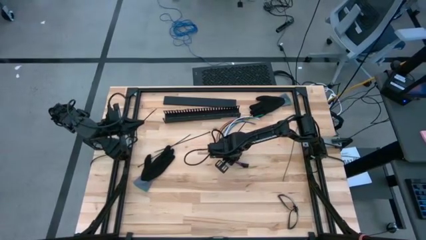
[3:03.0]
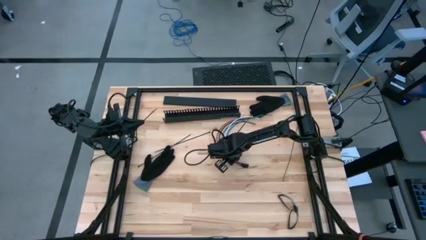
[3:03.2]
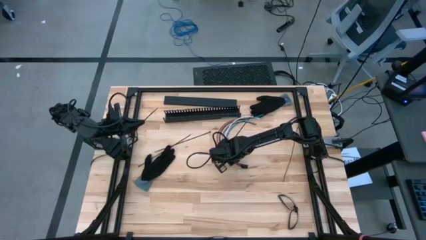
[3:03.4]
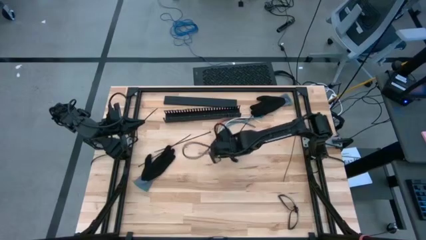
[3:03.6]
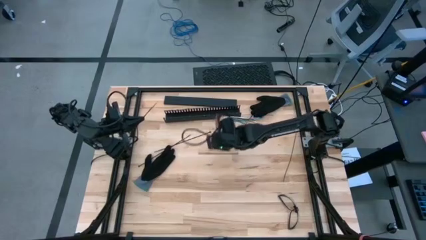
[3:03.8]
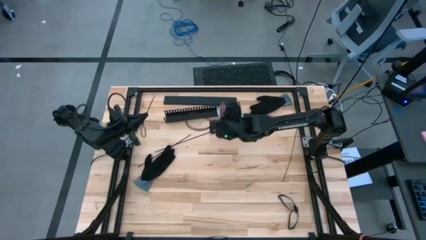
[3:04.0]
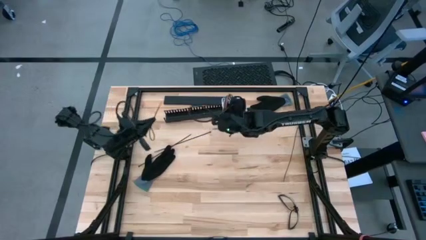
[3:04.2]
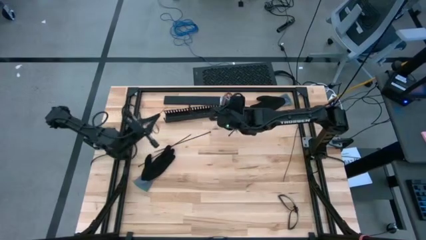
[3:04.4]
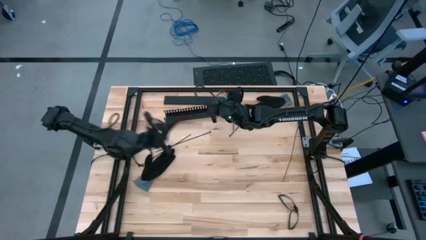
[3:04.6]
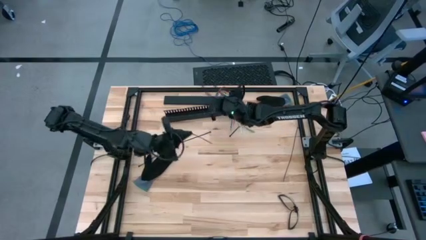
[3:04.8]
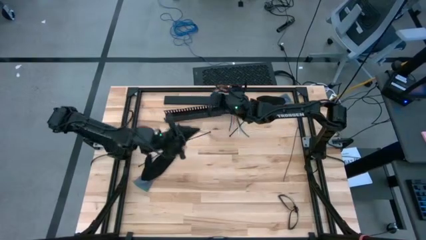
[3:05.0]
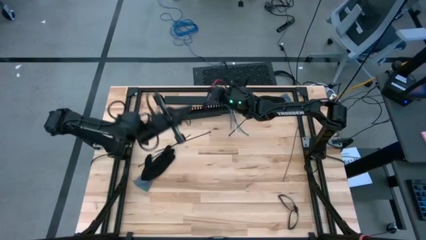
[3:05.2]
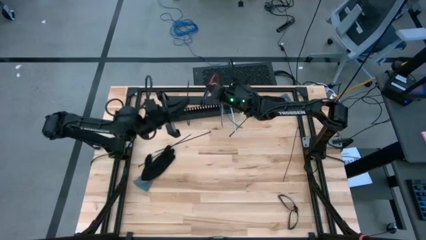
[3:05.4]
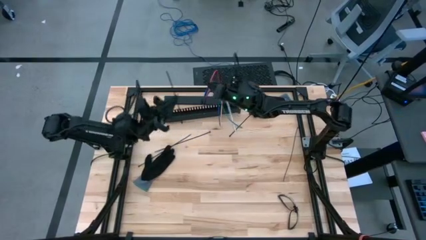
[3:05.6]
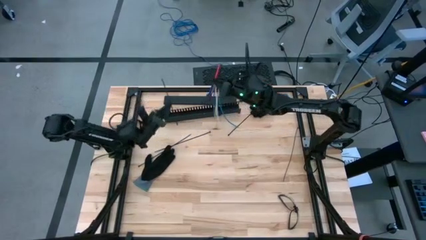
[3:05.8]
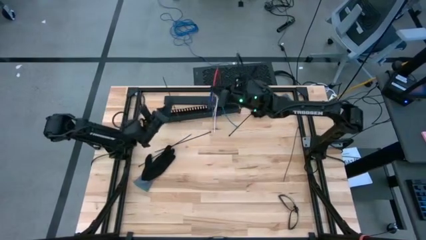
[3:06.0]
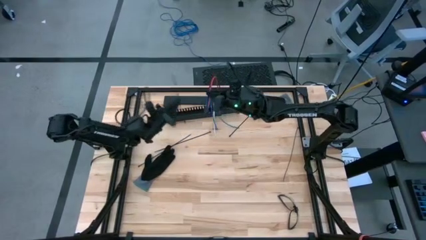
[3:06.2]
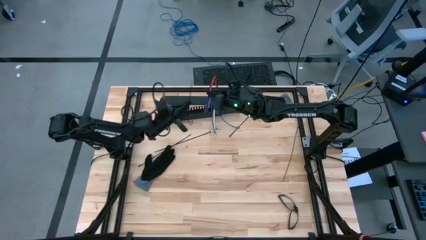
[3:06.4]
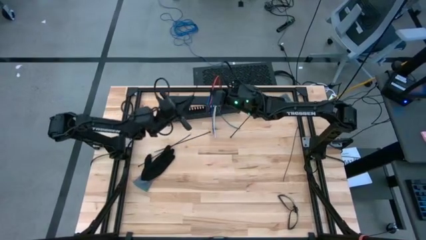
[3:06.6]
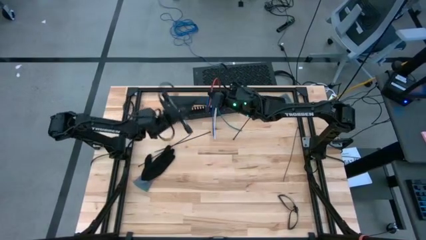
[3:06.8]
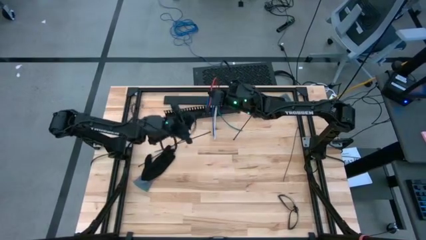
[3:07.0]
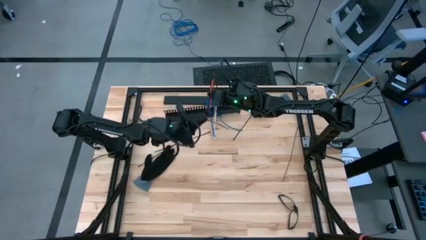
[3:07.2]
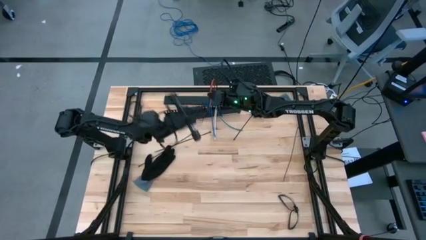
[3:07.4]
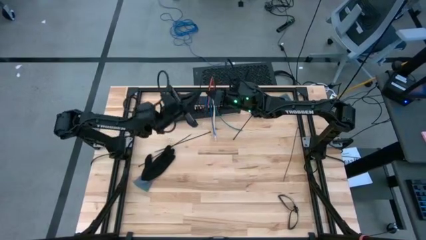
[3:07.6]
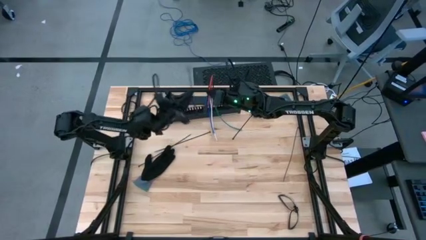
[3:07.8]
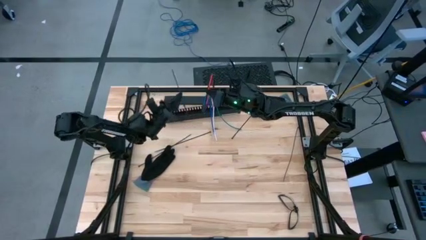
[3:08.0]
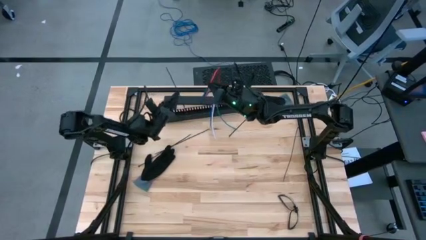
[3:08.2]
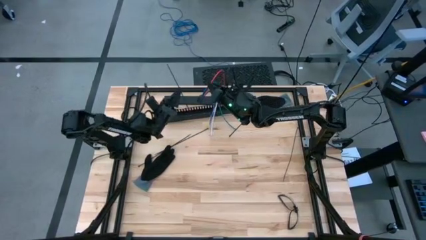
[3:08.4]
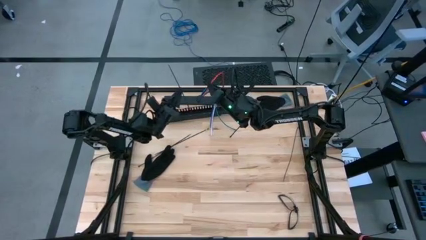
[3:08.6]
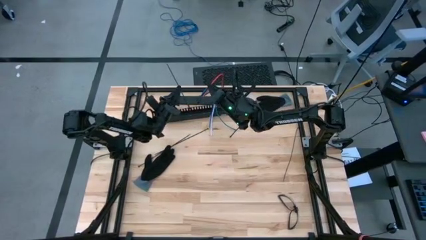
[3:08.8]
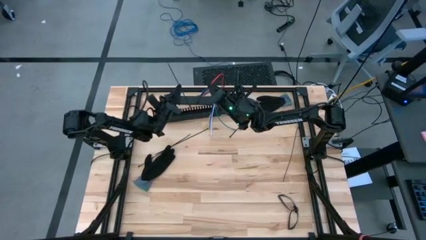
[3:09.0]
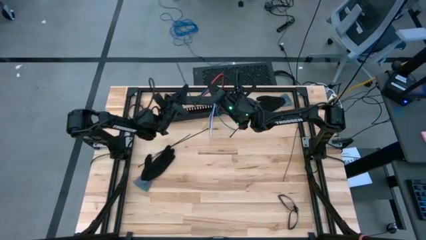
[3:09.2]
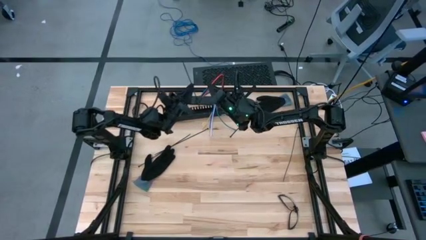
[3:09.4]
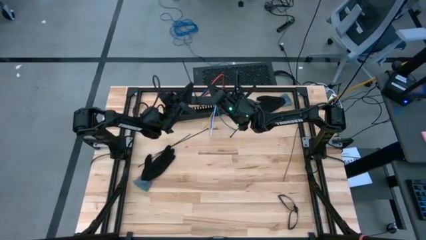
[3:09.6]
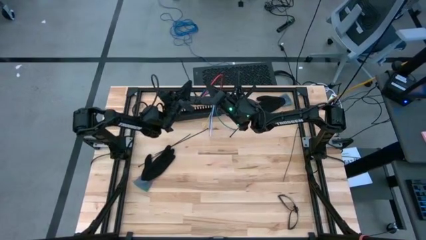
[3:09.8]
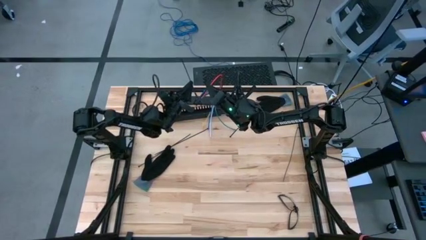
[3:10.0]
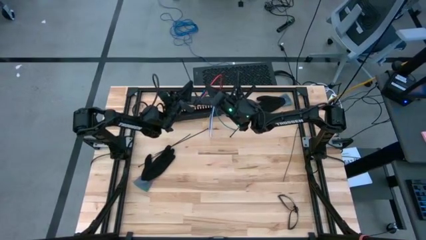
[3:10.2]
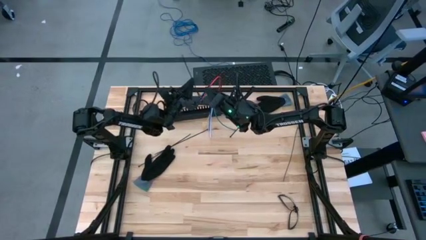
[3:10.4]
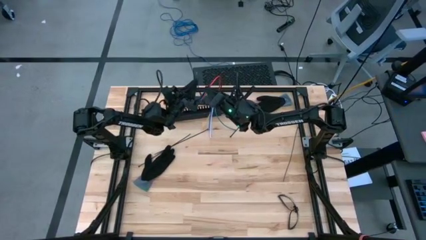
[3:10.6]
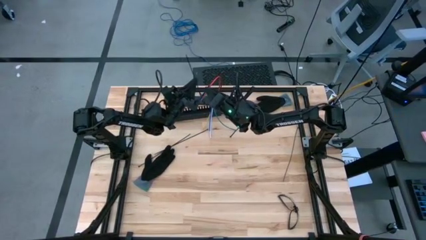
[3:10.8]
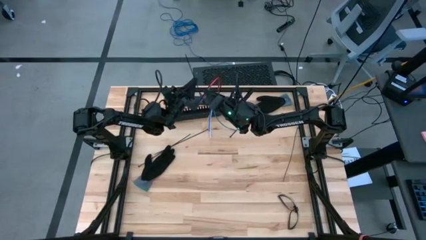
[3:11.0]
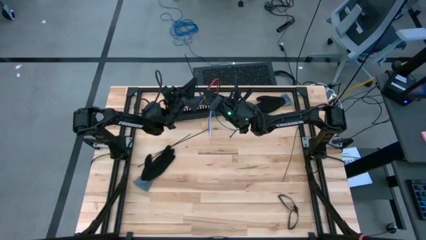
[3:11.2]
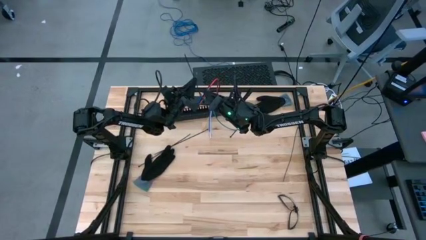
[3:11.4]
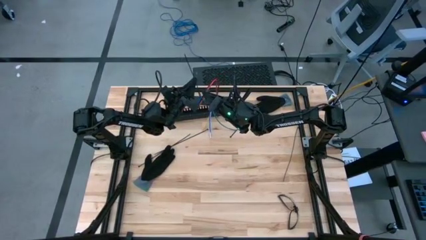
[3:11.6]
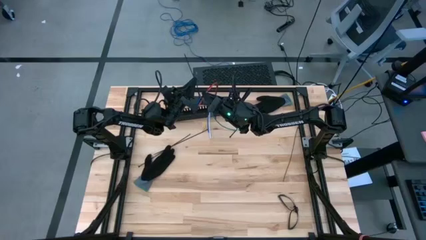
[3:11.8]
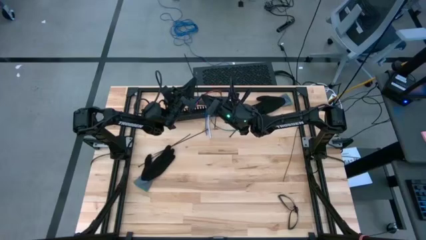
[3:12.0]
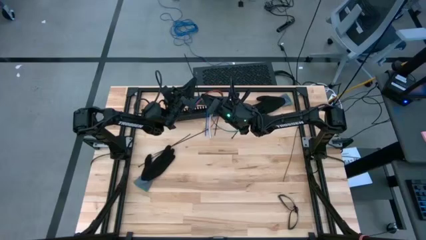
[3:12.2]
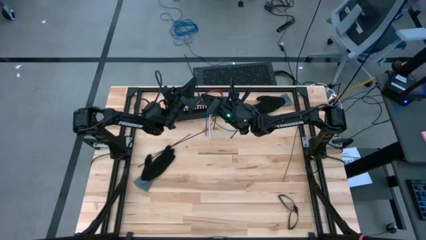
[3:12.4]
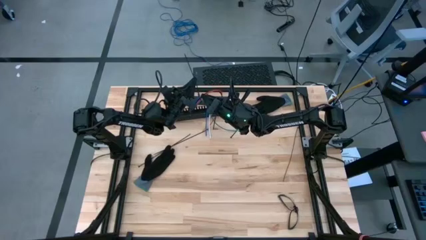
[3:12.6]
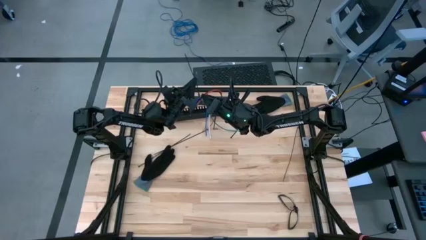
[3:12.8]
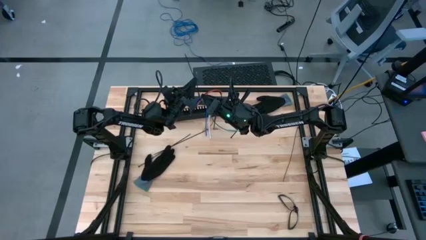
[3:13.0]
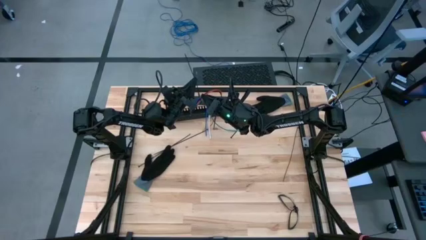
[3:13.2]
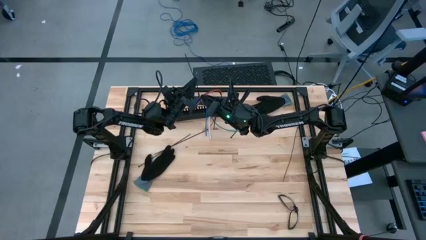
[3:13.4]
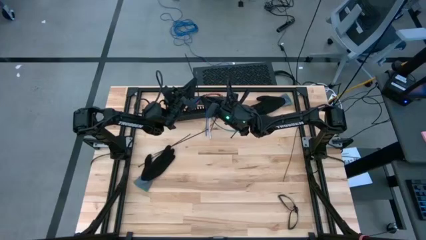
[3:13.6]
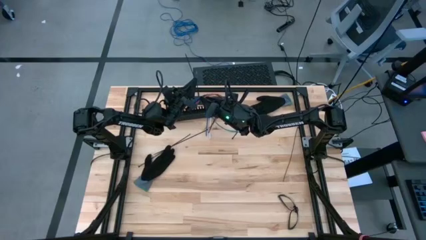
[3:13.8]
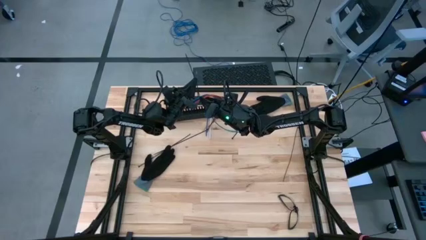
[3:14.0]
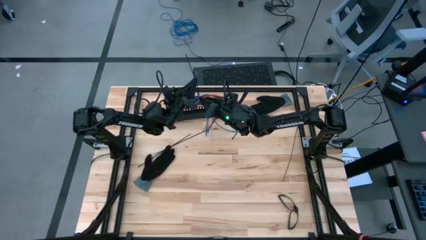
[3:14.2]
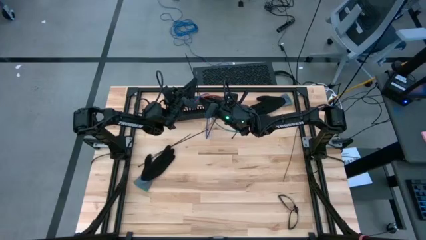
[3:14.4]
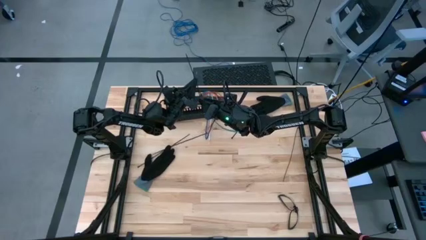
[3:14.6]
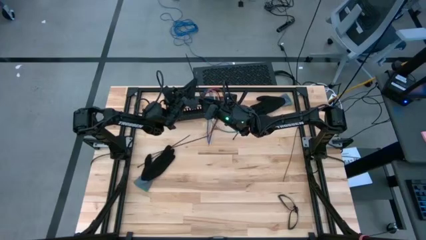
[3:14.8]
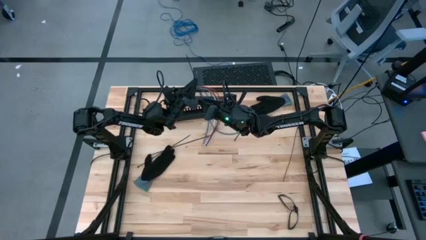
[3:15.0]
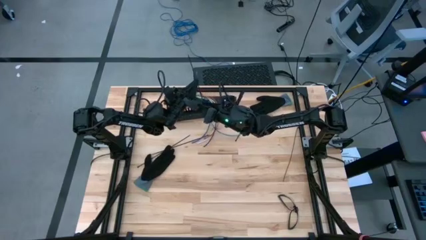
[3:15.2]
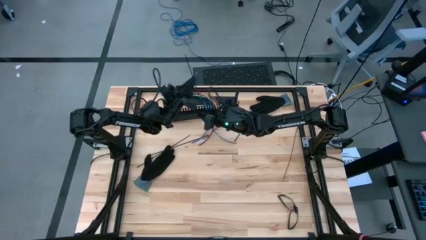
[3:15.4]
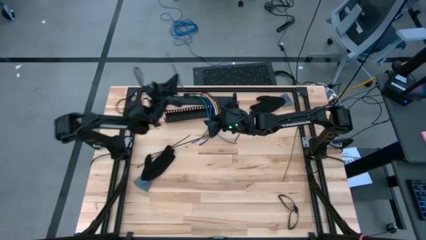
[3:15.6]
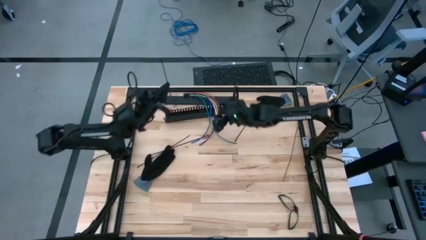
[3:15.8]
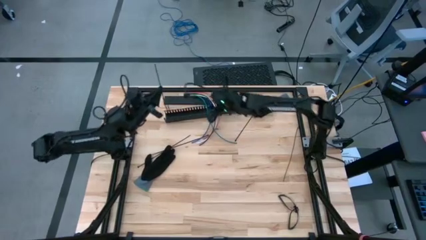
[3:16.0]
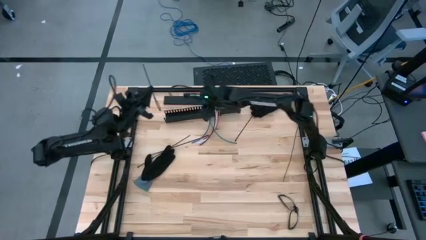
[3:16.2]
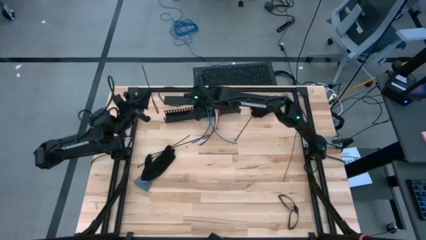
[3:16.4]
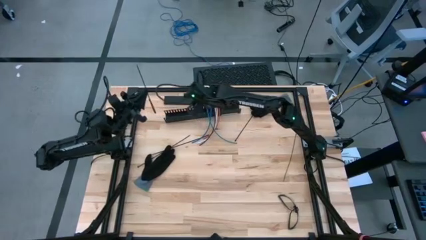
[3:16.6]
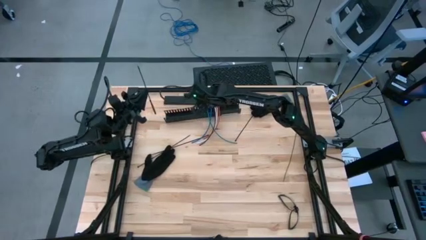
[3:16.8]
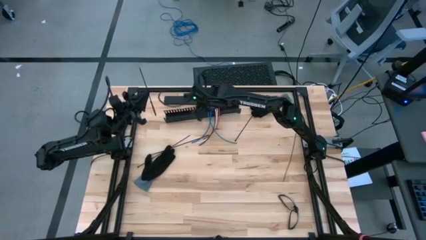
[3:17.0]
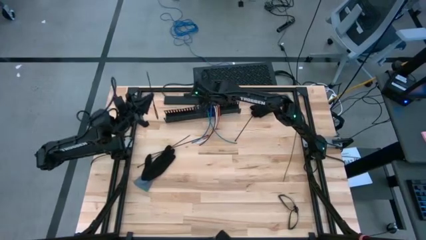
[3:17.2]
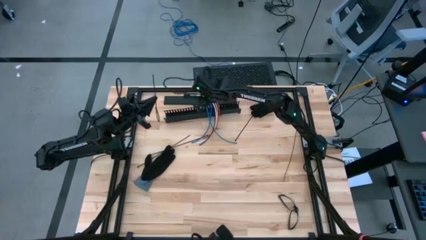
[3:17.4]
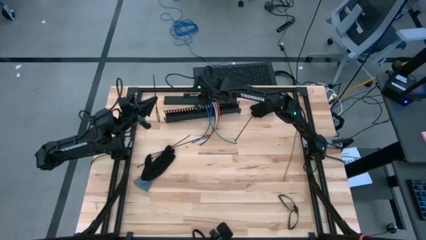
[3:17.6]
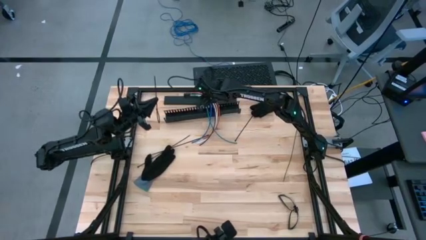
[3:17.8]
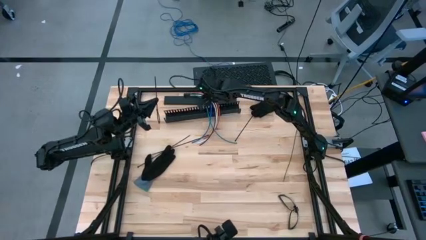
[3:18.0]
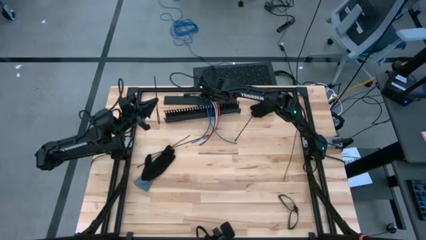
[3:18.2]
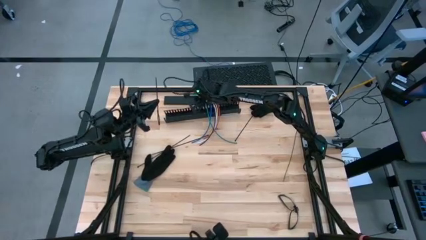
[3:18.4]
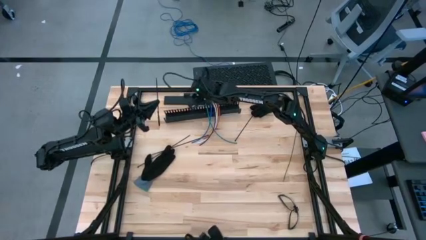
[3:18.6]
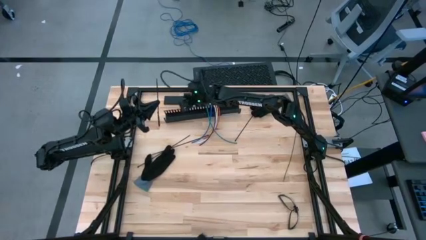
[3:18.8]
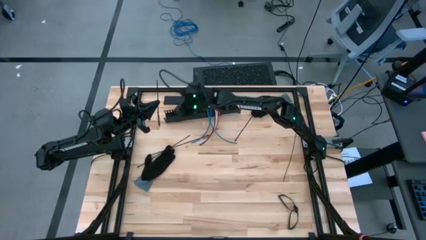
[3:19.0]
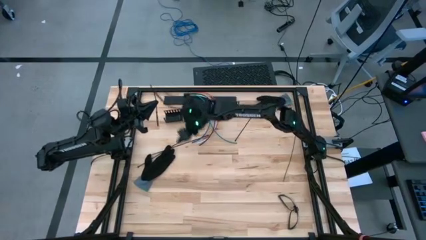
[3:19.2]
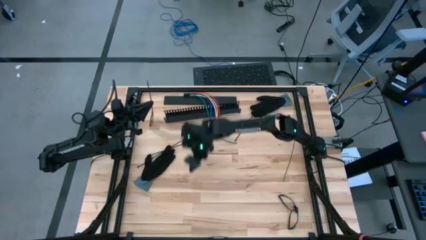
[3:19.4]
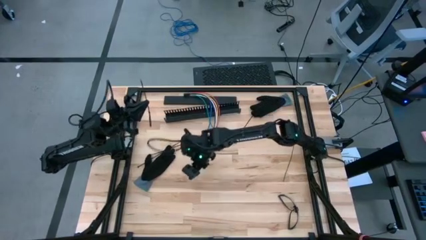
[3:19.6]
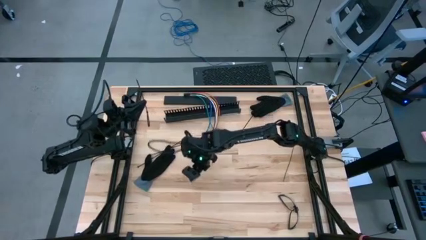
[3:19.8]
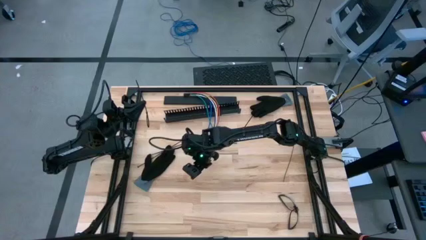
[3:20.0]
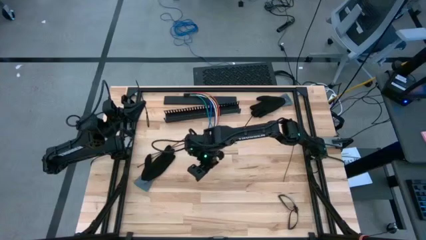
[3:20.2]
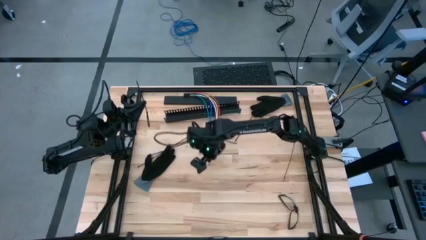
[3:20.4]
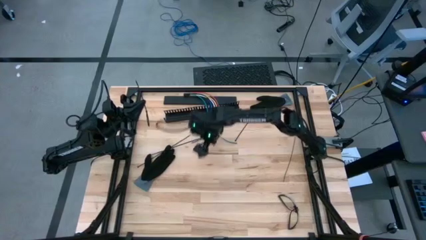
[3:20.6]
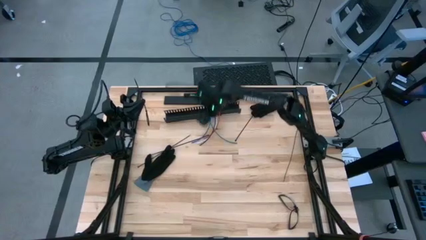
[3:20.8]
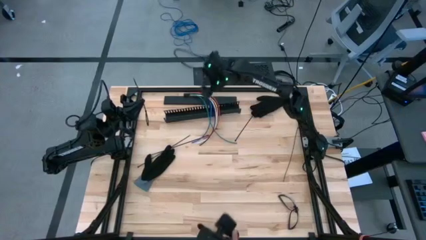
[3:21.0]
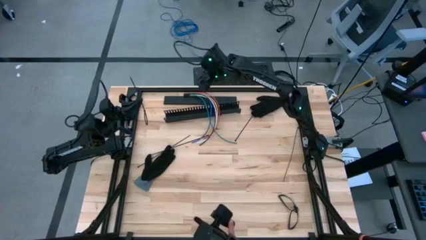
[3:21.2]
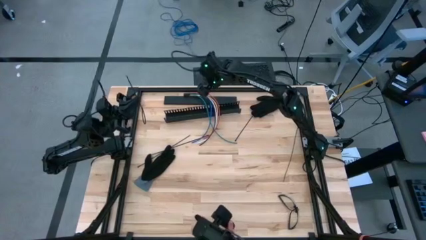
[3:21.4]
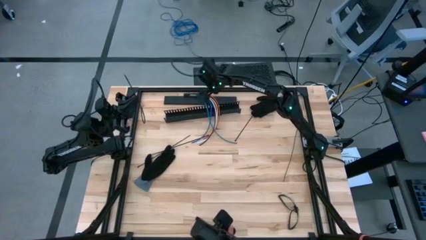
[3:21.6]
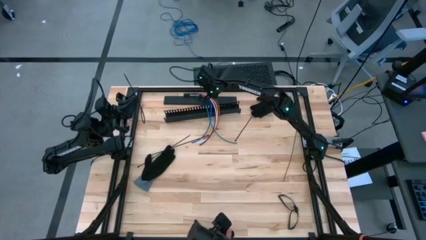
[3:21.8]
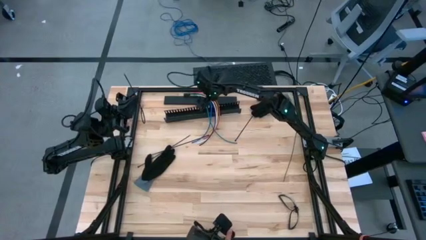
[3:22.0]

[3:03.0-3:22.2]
Task: Ziptie cables
Wrap the cable wires using a zip tie
